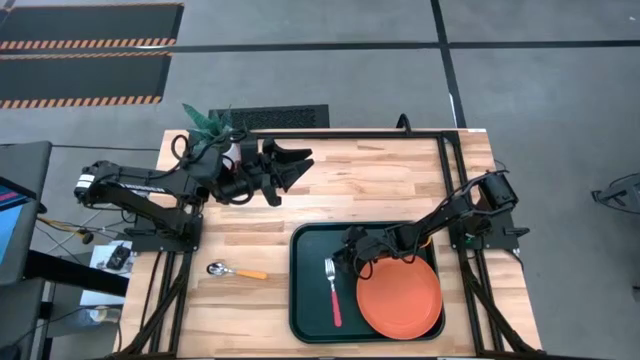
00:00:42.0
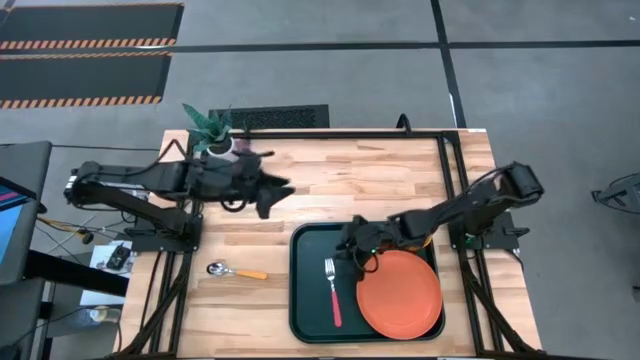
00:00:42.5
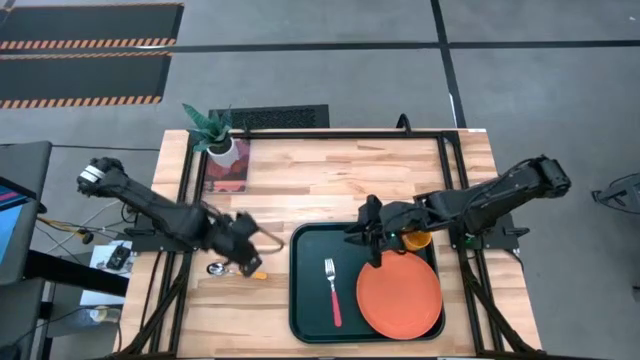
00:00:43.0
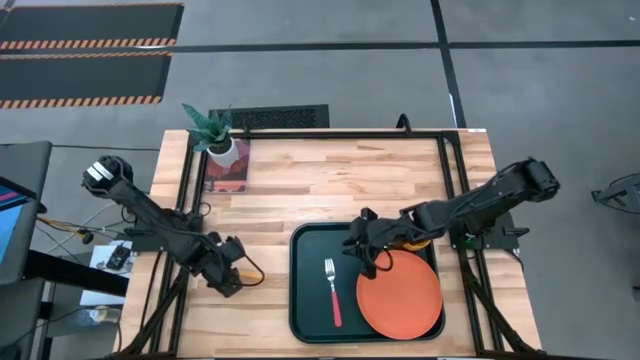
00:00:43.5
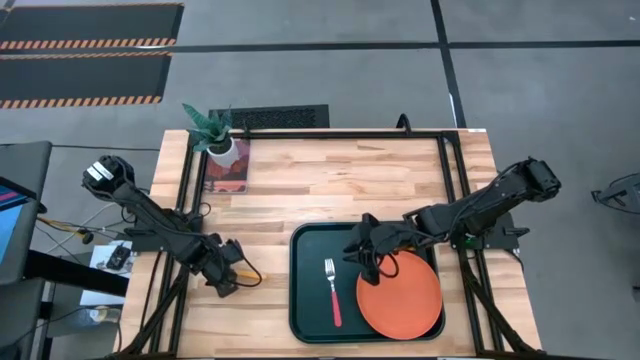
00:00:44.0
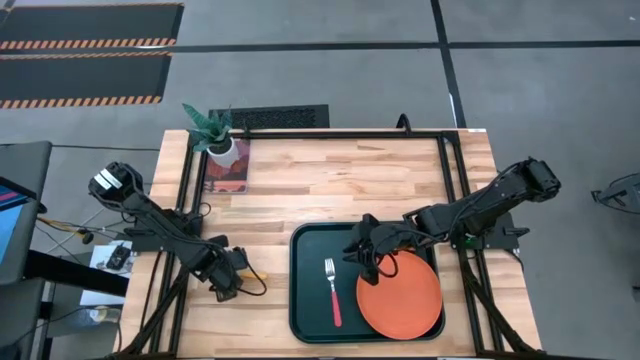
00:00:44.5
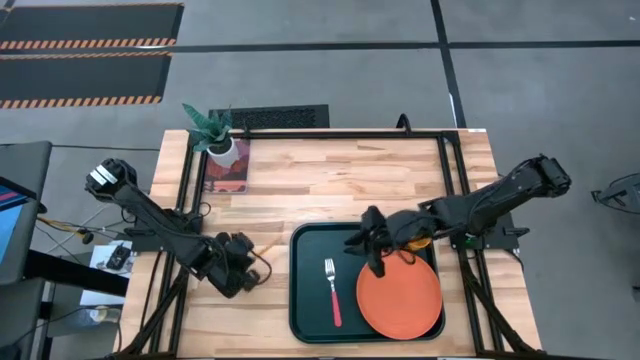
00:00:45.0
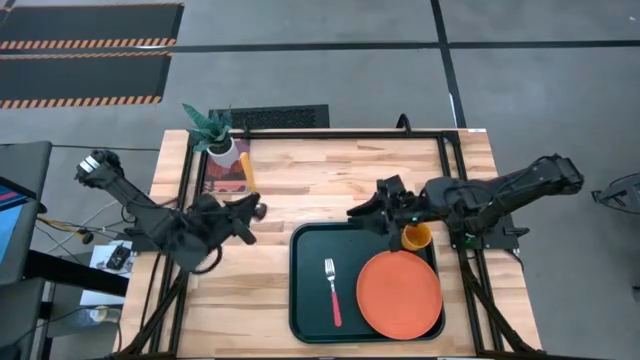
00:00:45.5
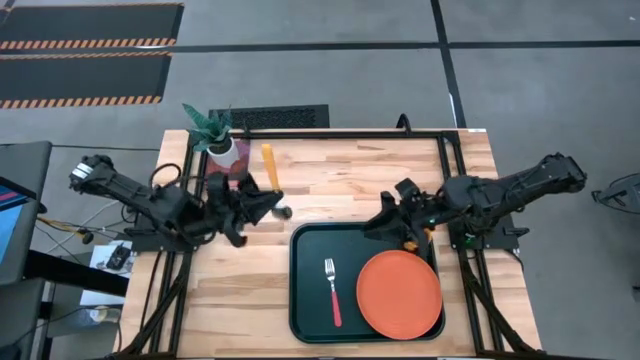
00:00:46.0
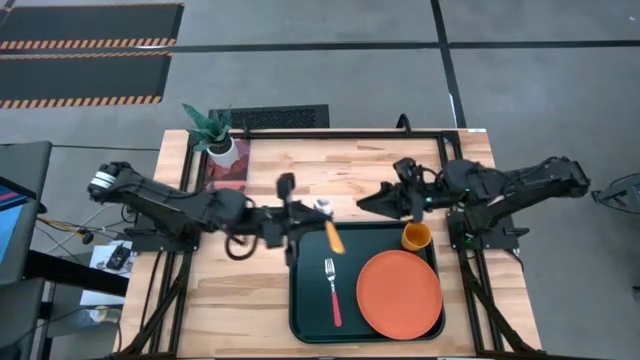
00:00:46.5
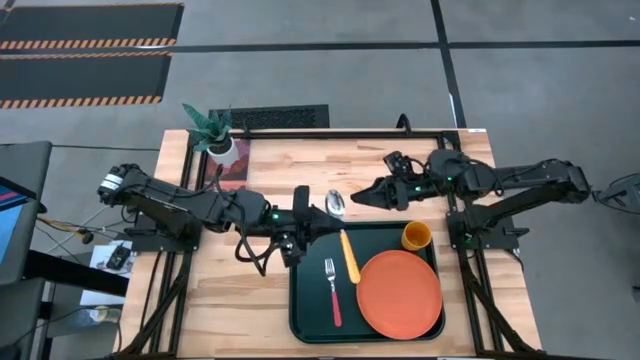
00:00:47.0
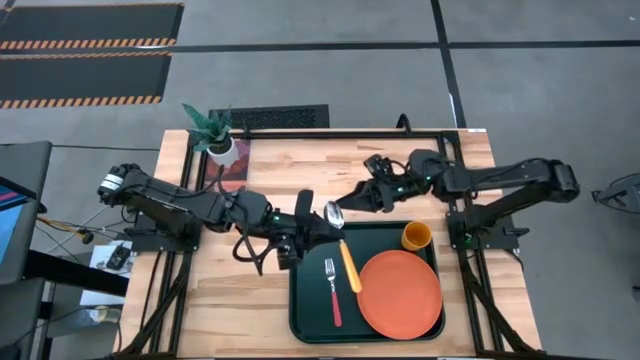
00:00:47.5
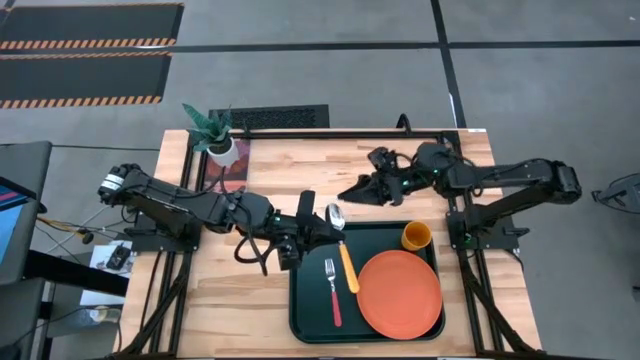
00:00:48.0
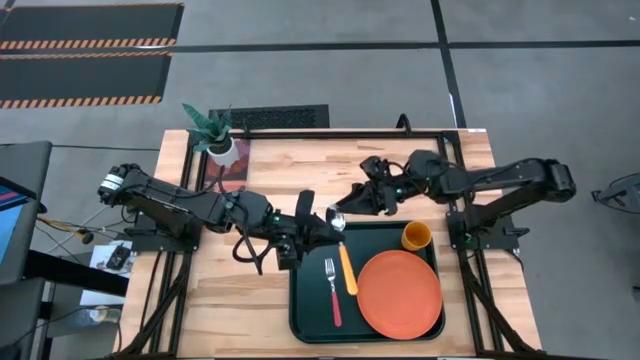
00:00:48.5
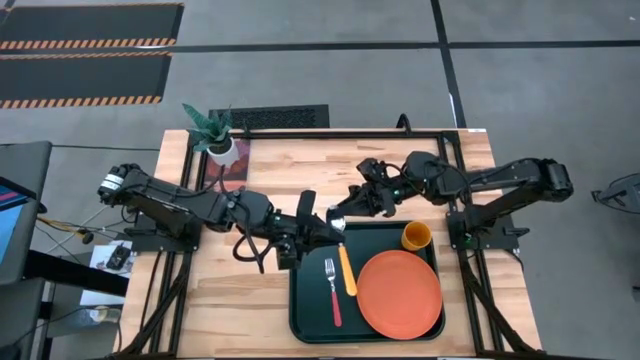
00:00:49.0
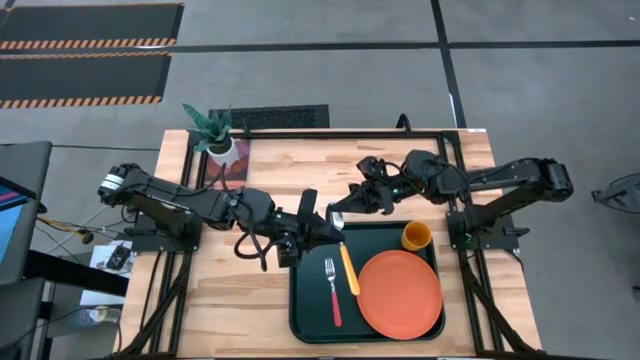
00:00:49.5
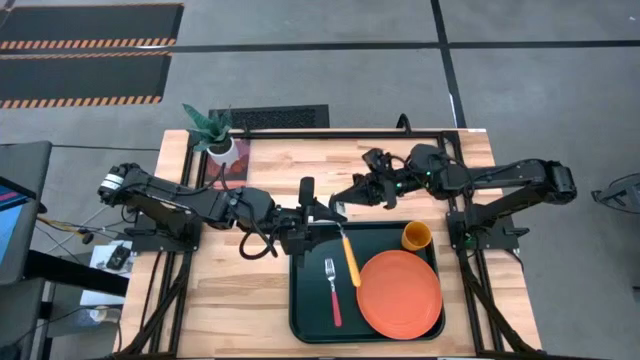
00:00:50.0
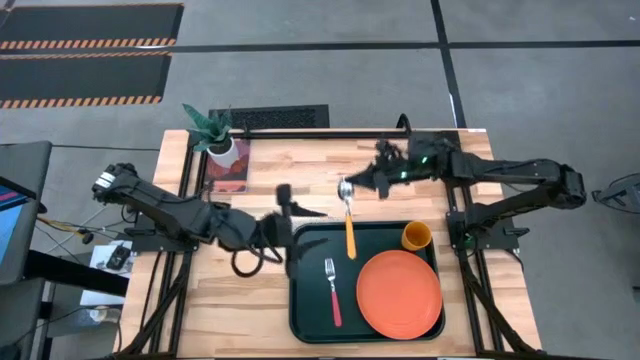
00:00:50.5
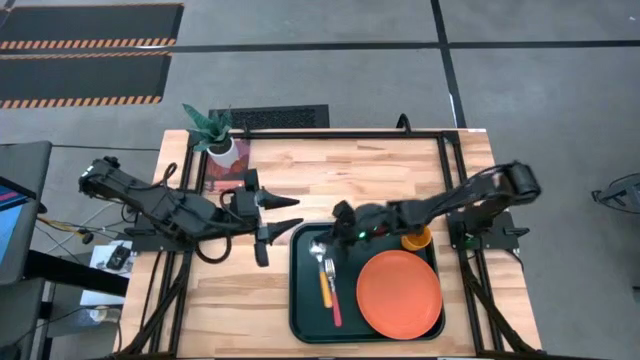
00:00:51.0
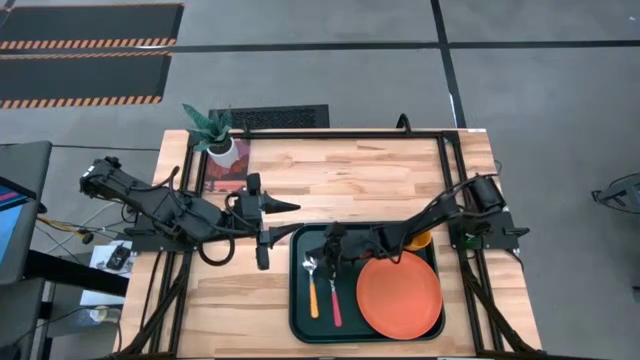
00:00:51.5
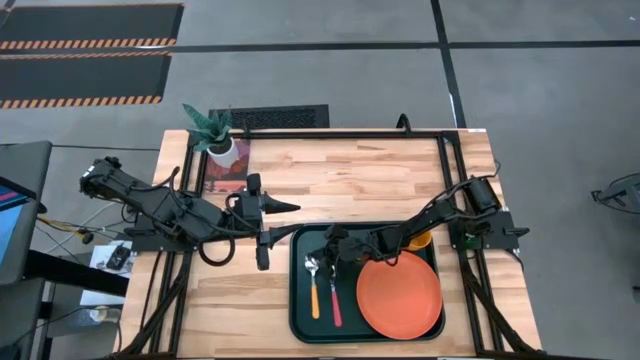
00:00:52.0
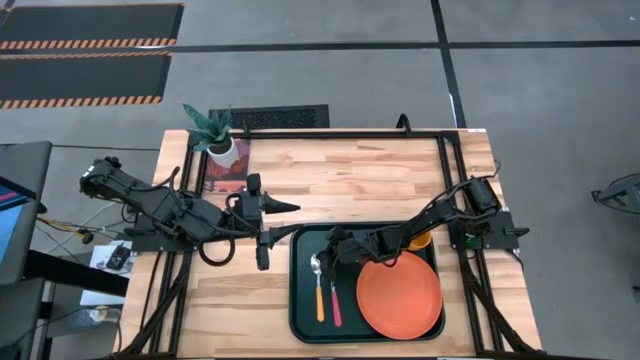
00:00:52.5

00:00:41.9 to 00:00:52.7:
Task: Pick and place plate/cup/fork/spoon on tray
Put the yellow spoon next to the pink fork on the black tray

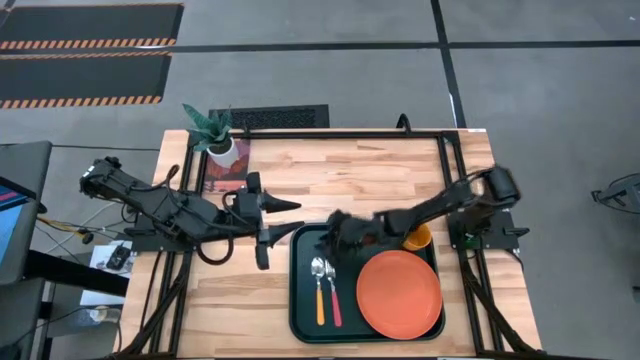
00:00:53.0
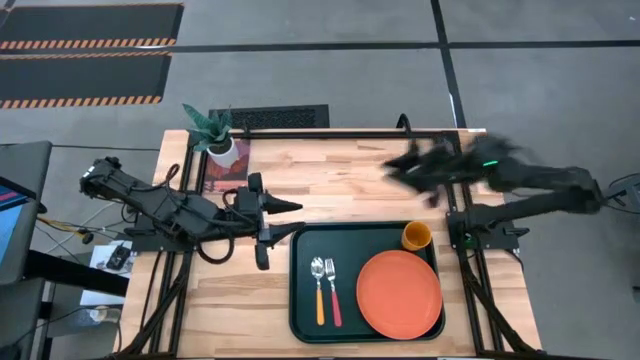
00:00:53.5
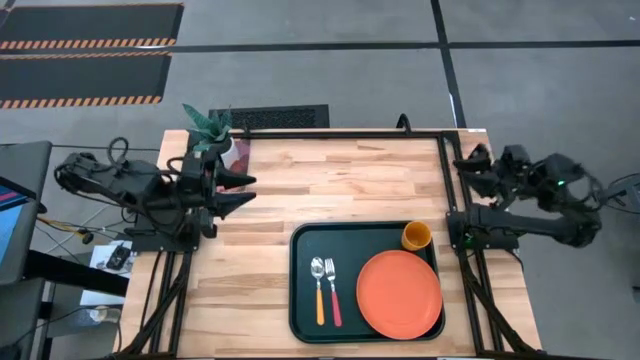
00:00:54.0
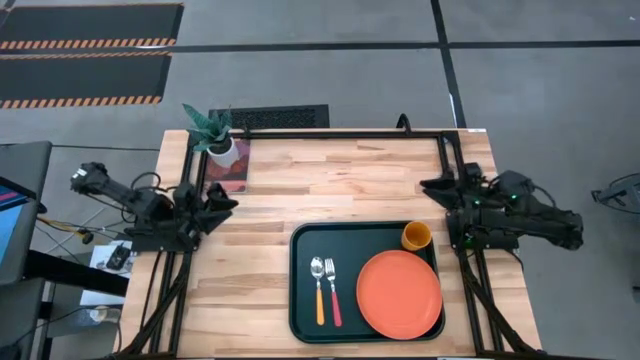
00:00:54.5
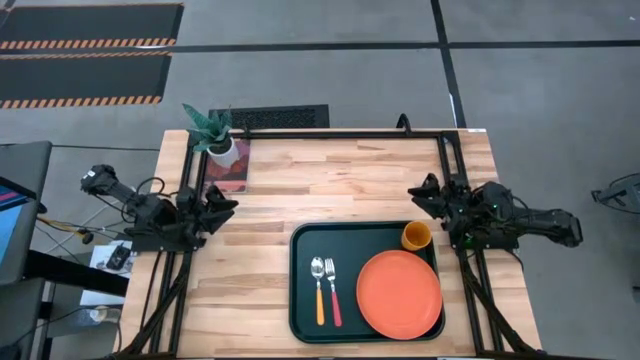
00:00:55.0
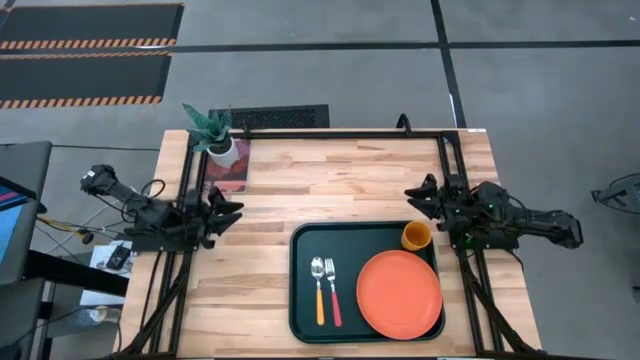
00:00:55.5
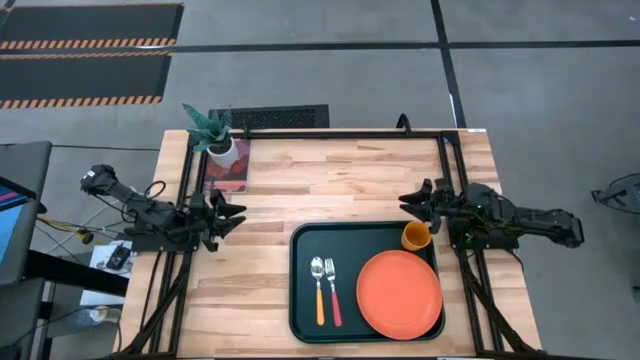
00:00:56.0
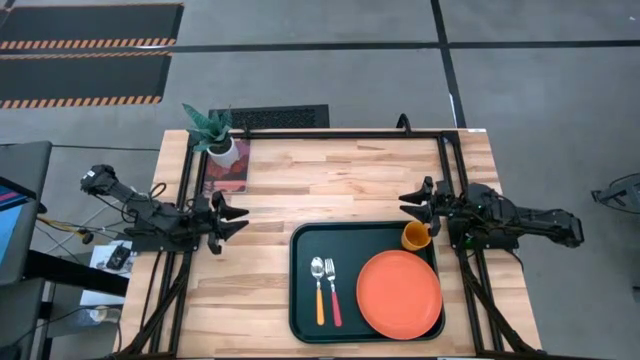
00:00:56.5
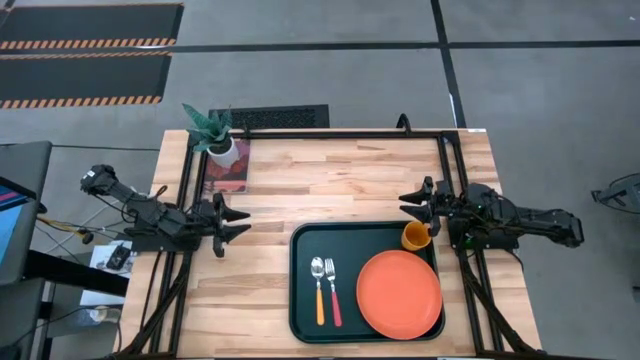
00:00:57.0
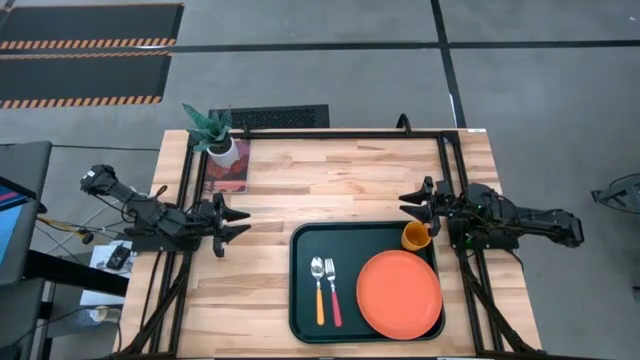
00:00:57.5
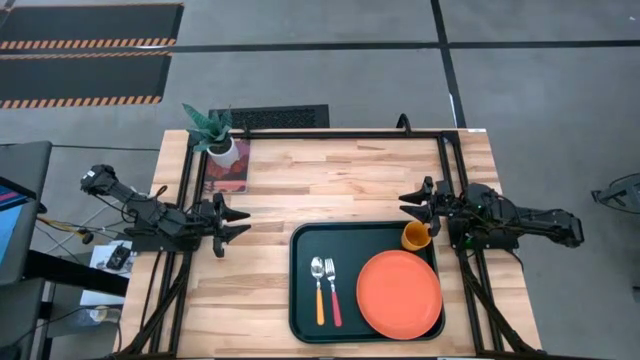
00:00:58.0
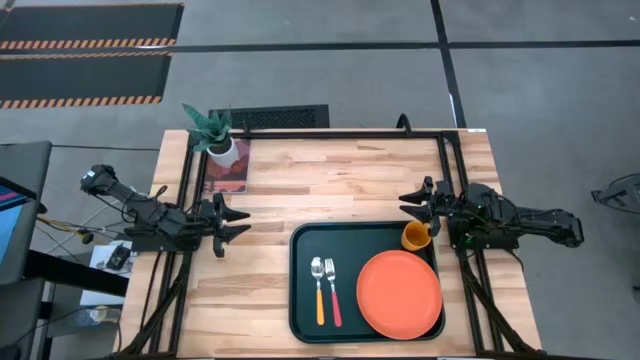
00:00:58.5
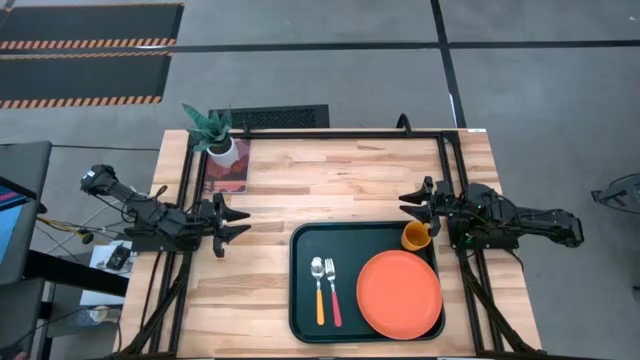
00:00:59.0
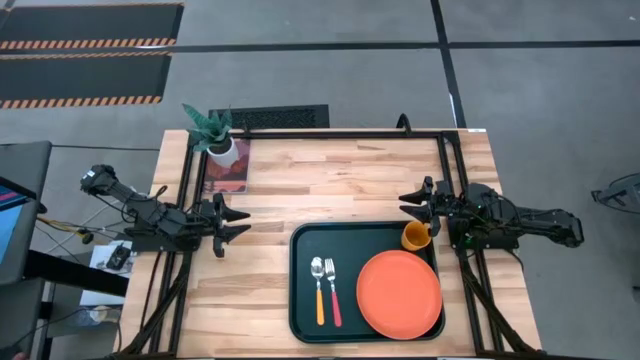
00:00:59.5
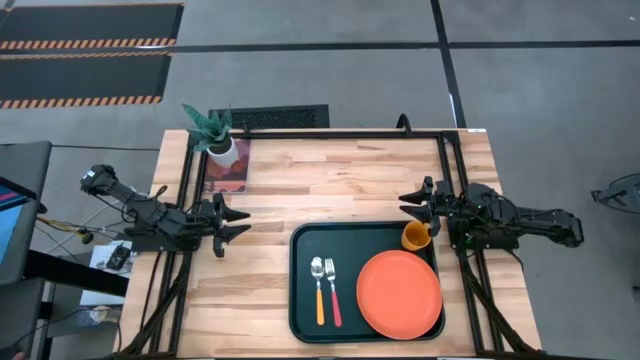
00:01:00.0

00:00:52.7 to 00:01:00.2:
Return to Home Position

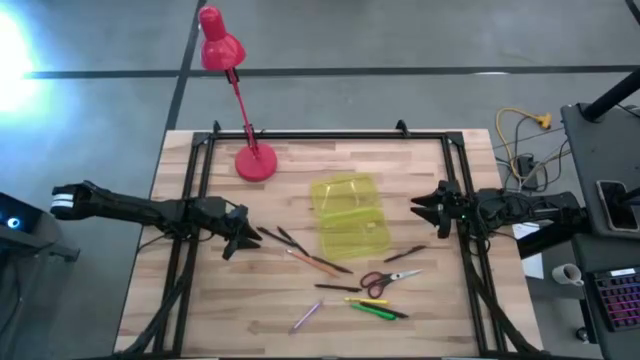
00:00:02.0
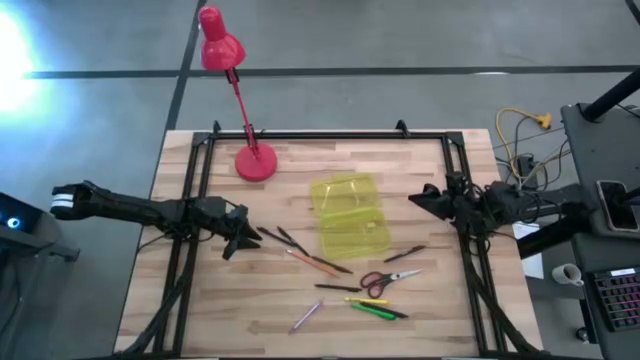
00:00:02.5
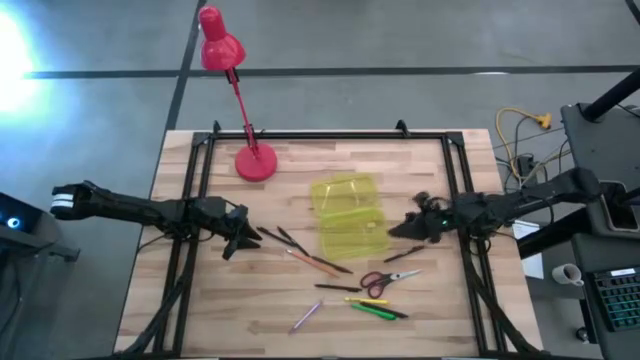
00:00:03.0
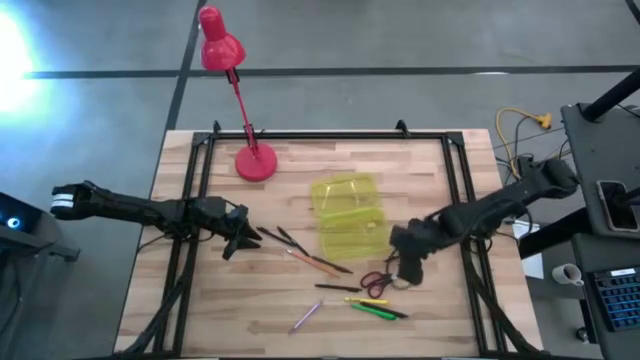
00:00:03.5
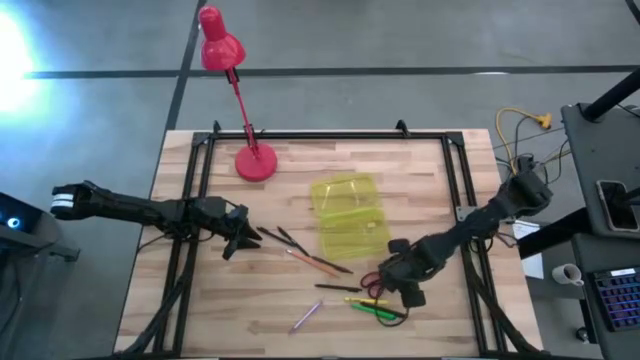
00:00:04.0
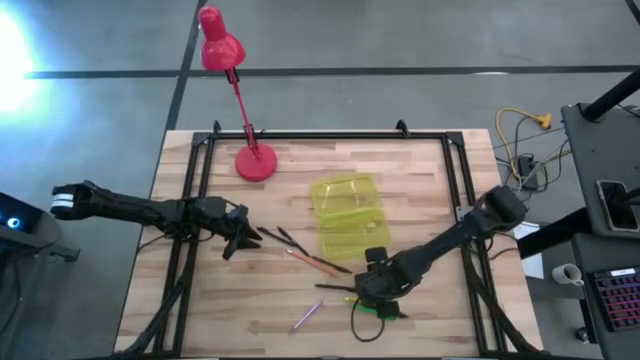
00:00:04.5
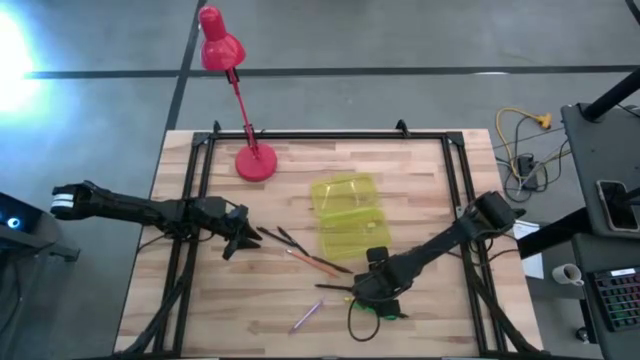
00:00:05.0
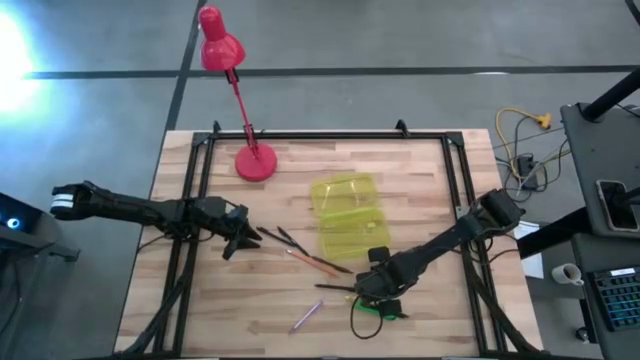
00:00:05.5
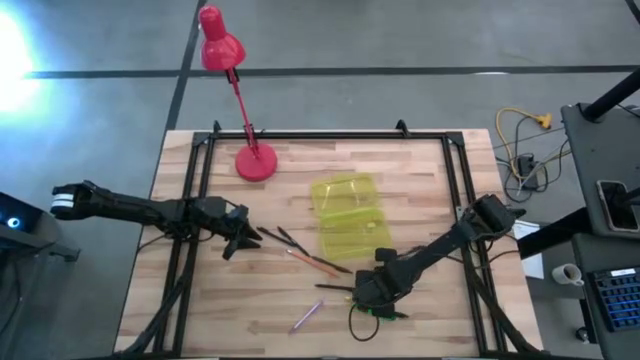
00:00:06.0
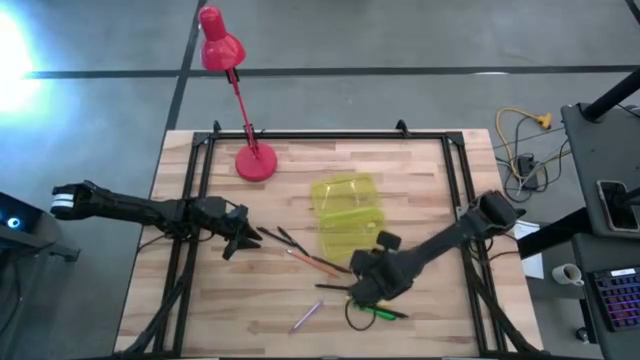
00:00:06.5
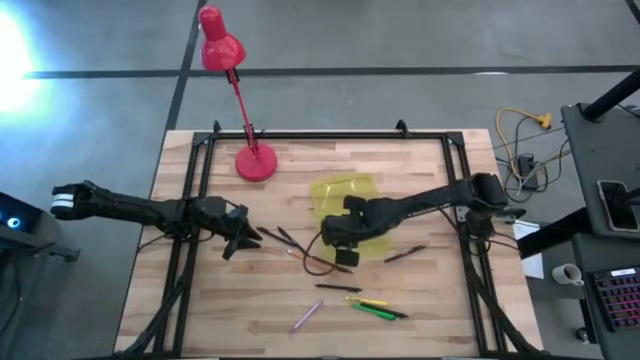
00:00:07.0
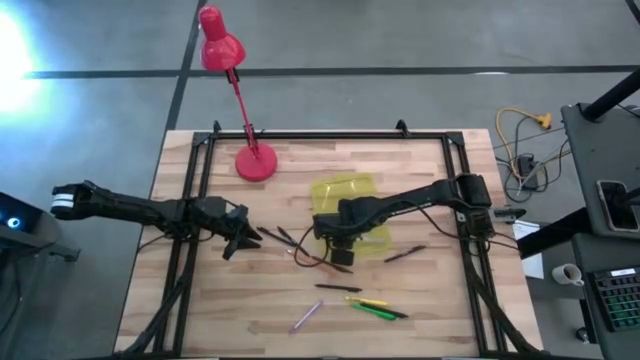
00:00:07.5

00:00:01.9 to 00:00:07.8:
Task: Pick & place school supplies into a supply box
Put the black scissors into the yellow supply box
